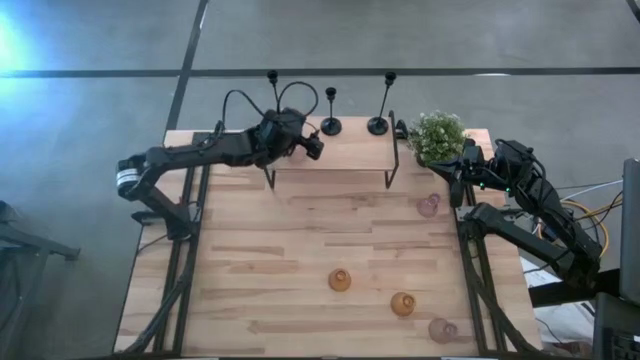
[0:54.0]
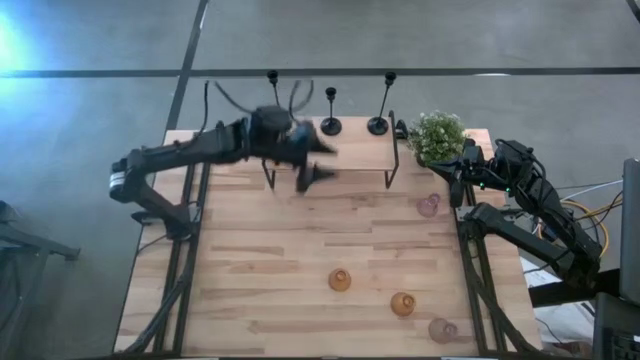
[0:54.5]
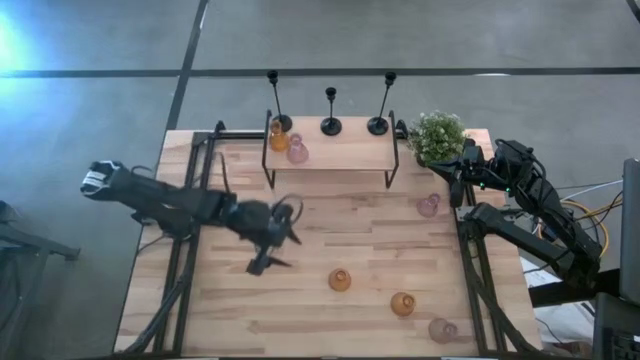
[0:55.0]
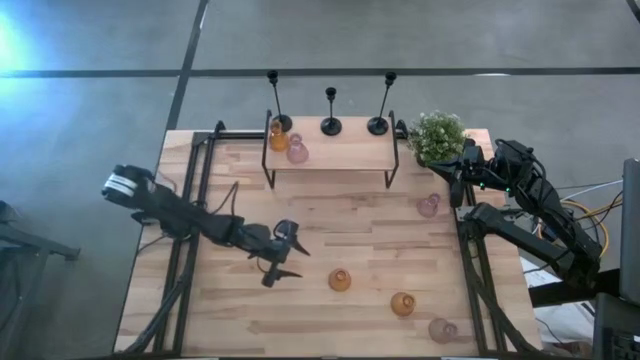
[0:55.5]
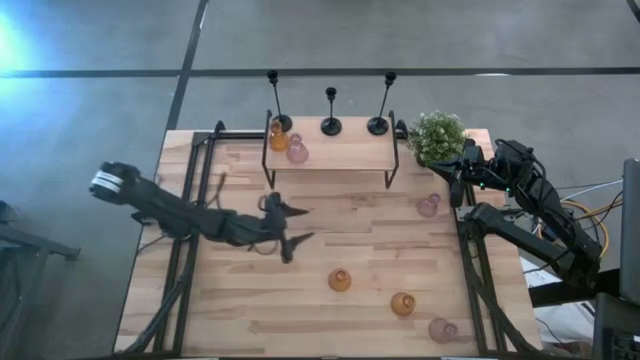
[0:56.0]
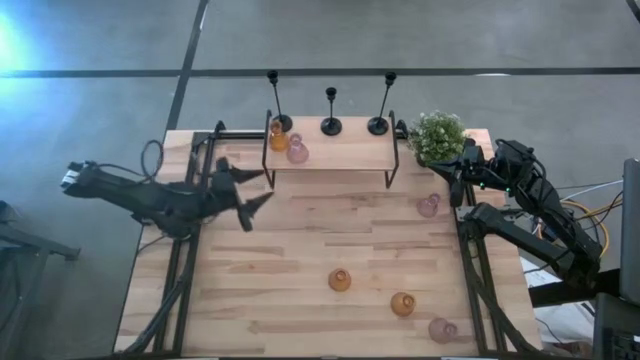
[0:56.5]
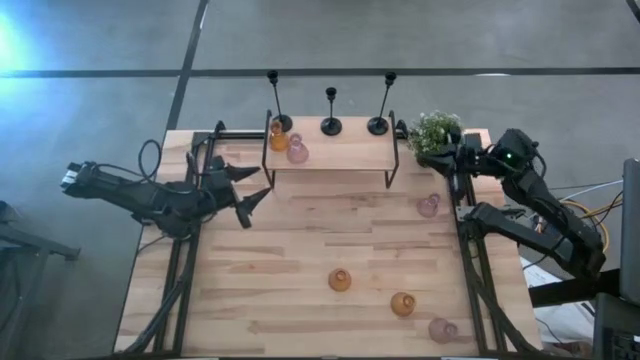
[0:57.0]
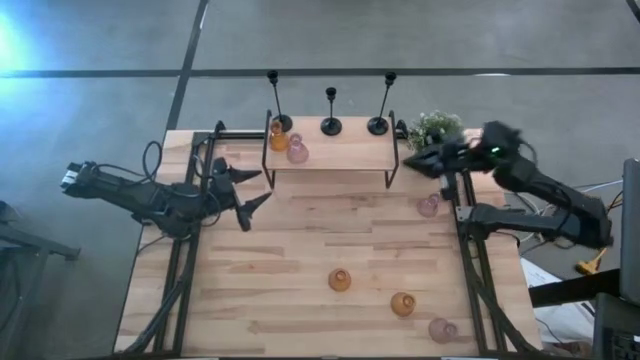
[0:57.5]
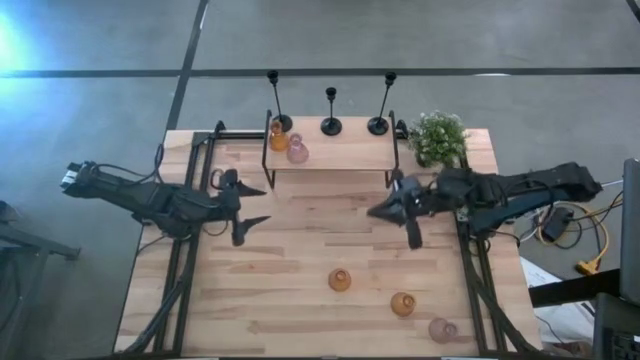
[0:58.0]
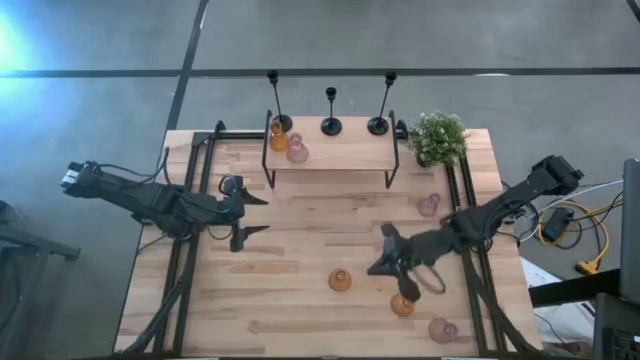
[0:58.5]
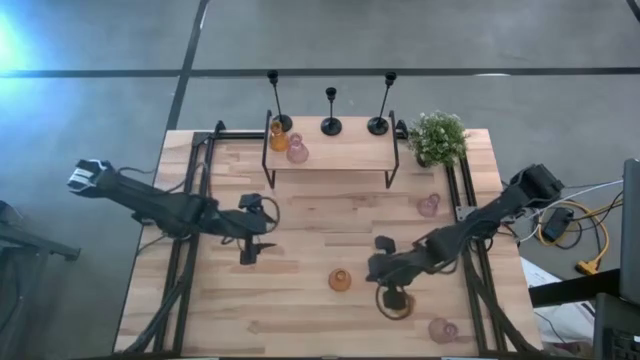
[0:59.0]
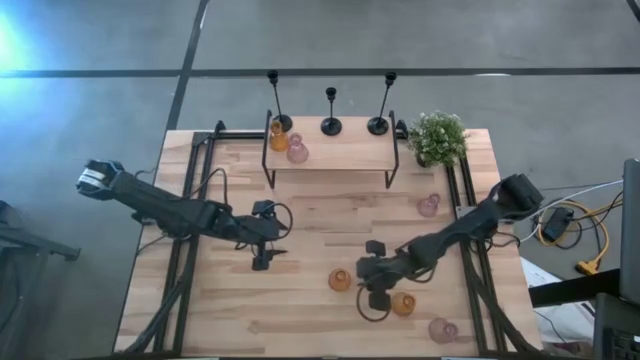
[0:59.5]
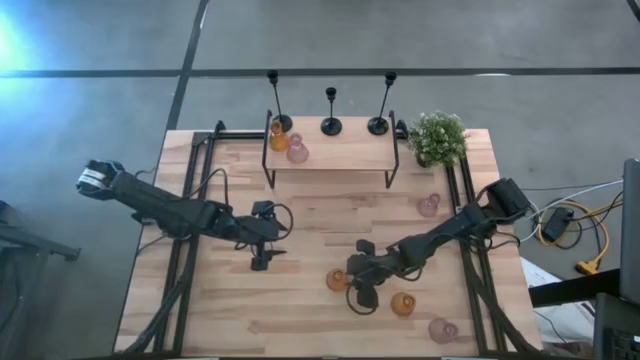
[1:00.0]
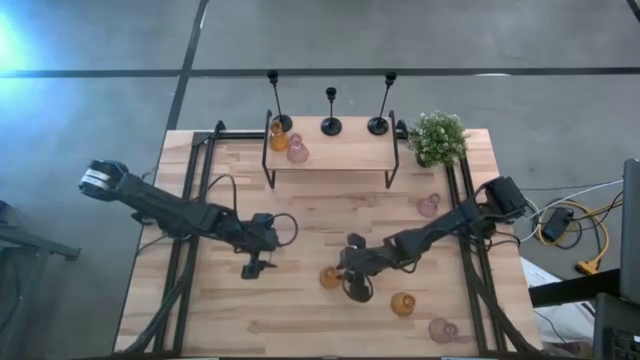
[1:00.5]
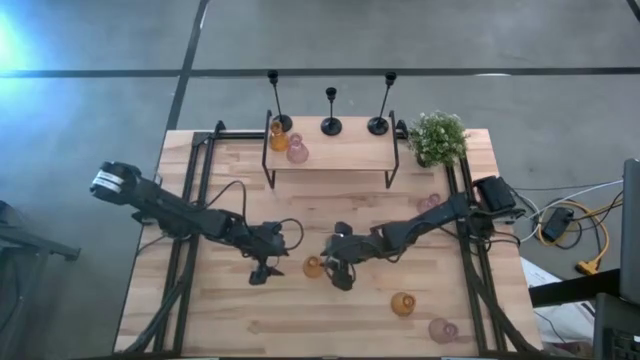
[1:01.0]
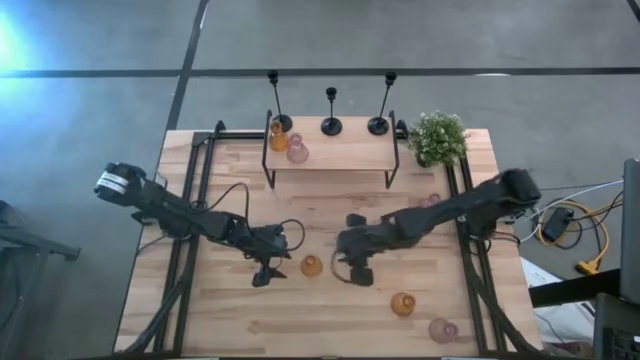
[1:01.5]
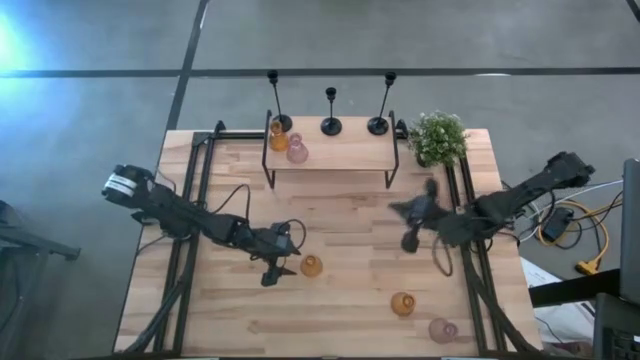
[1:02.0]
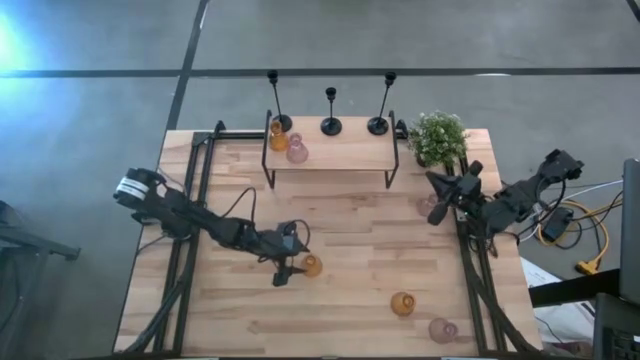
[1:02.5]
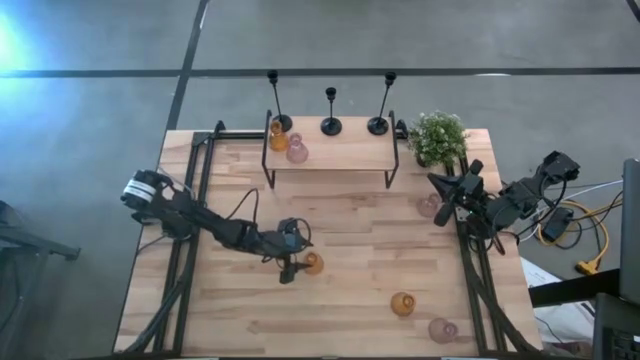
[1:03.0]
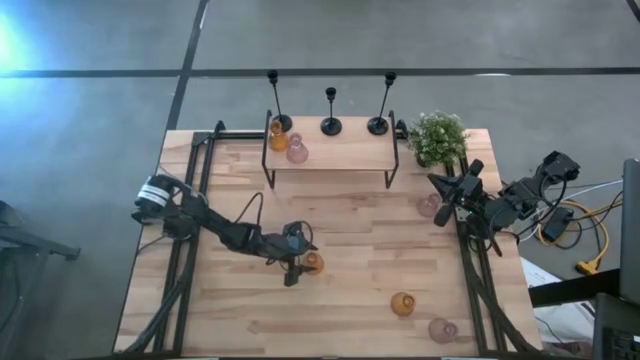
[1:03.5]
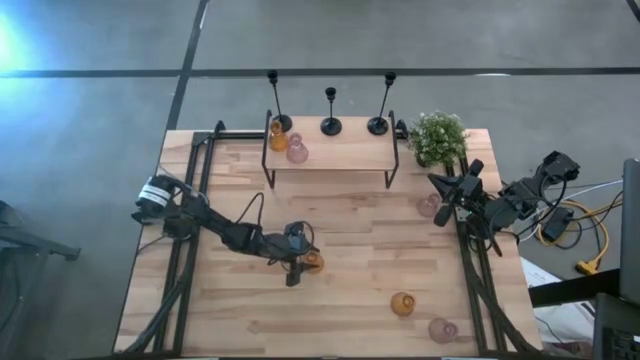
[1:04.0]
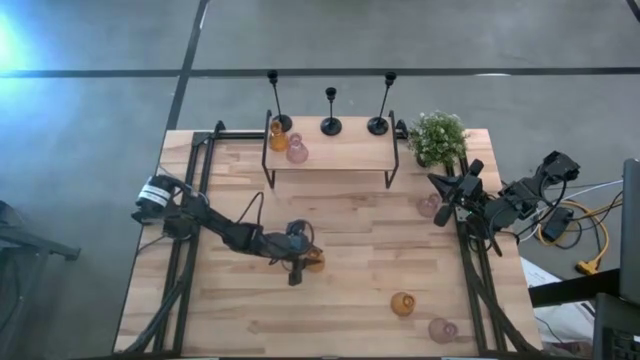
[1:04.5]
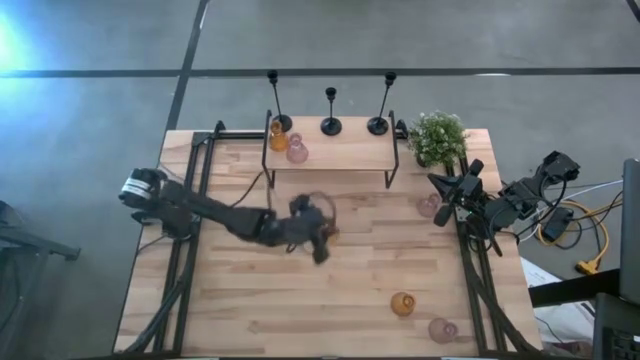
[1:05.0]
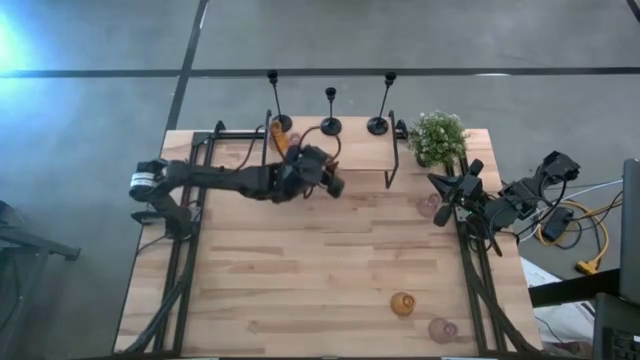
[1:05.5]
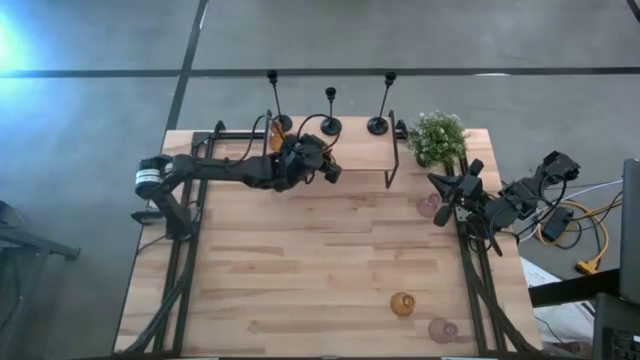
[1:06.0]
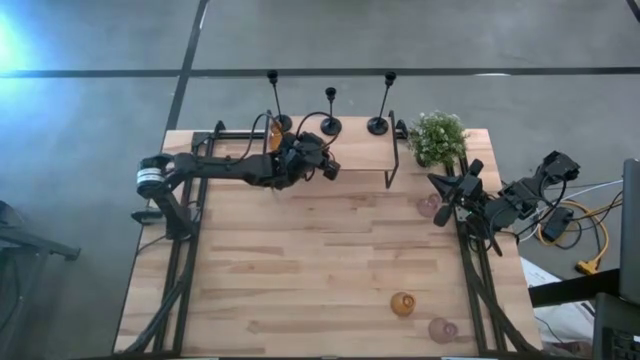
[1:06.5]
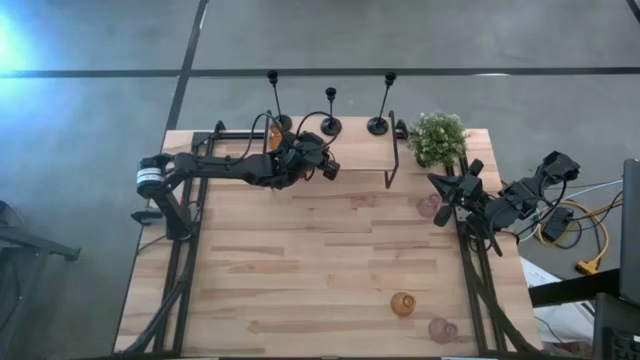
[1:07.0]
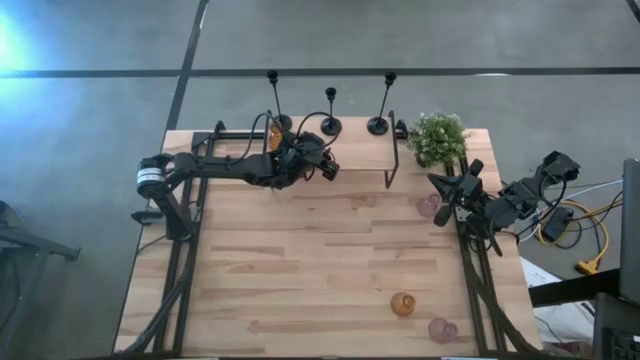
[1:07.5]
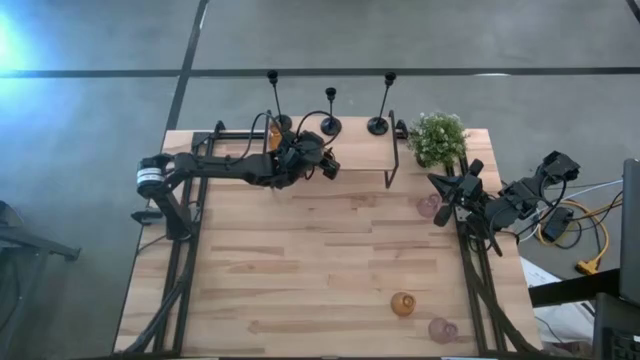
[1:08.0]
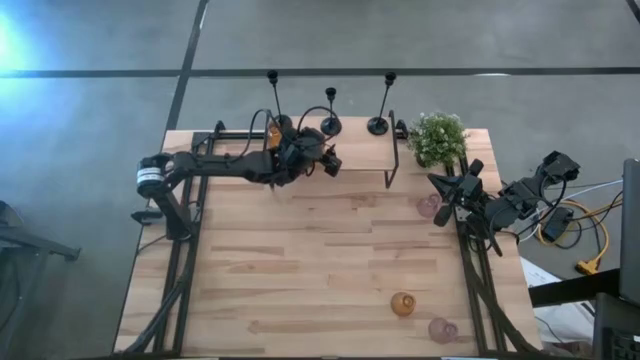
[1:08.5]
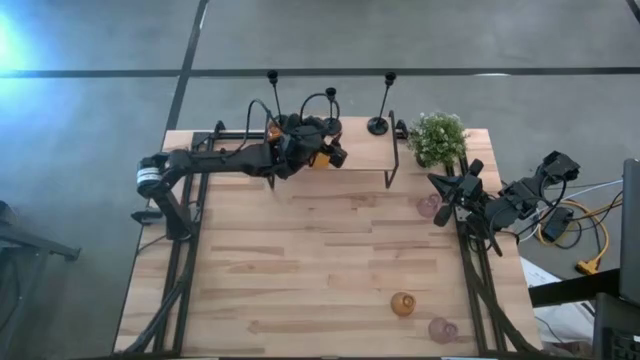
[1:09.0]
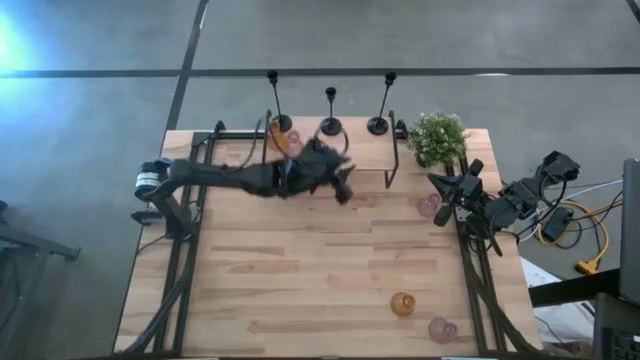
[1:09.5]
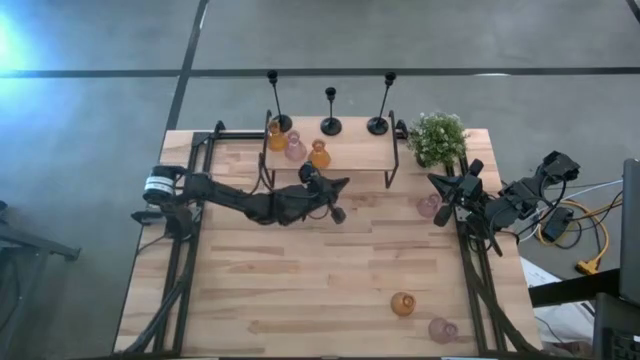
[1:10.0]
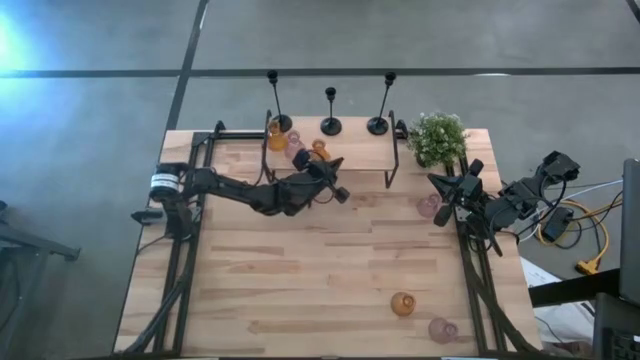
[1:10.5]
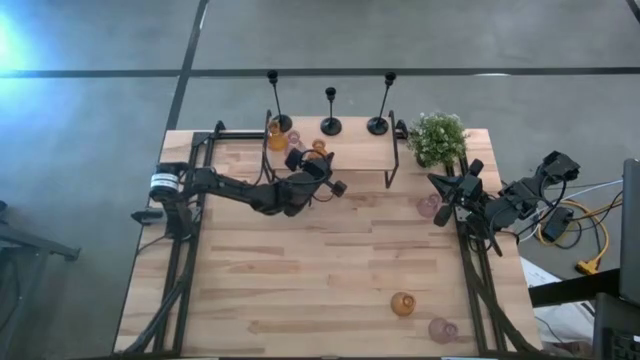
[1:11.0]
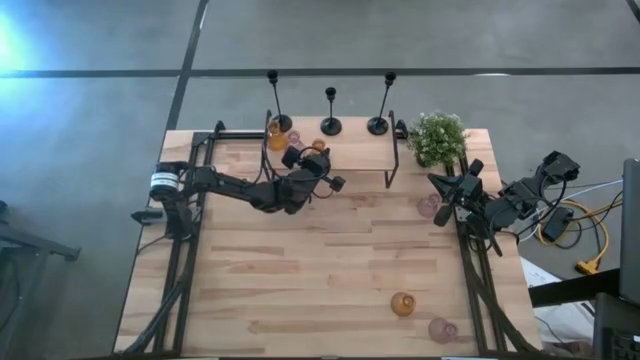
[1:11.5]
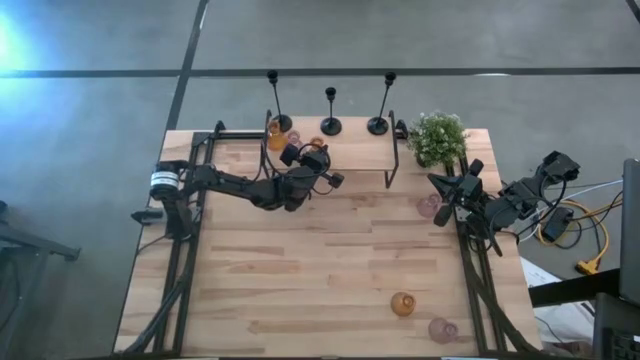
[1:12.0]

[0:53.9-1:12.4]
Task: Pick & Place candle stick holders
Put the left orange glass candle holder on the shelf

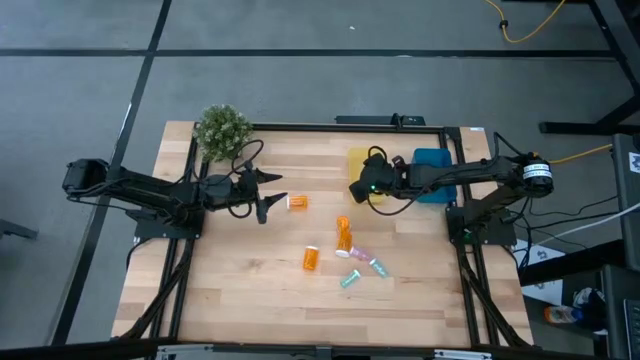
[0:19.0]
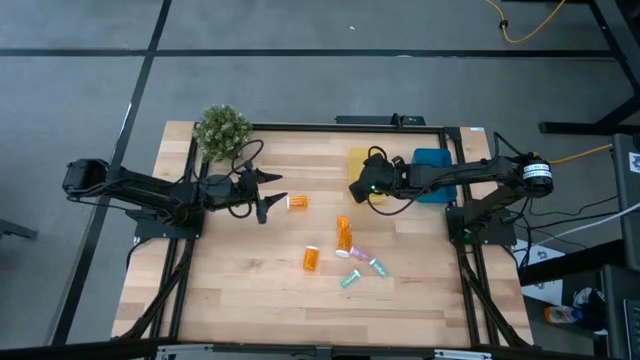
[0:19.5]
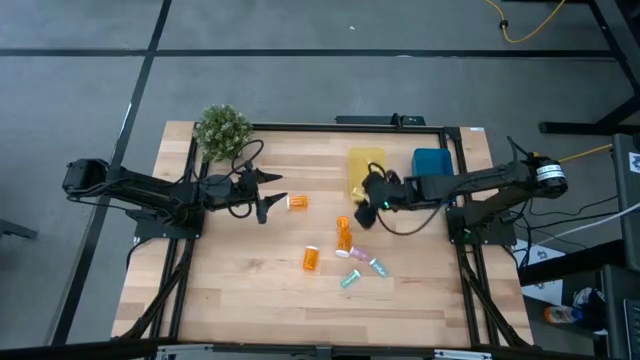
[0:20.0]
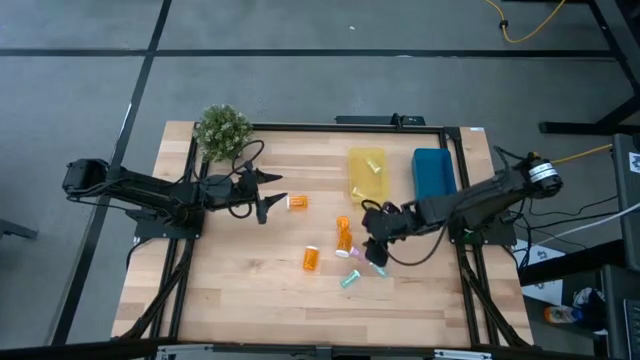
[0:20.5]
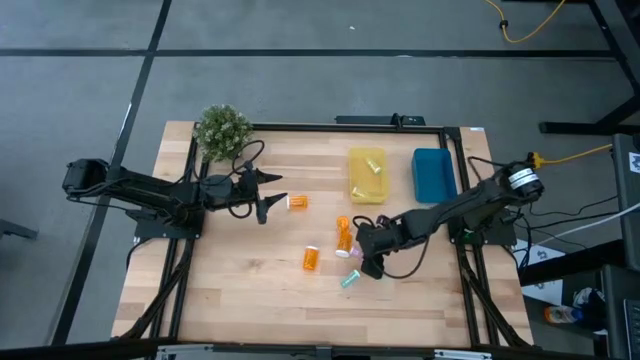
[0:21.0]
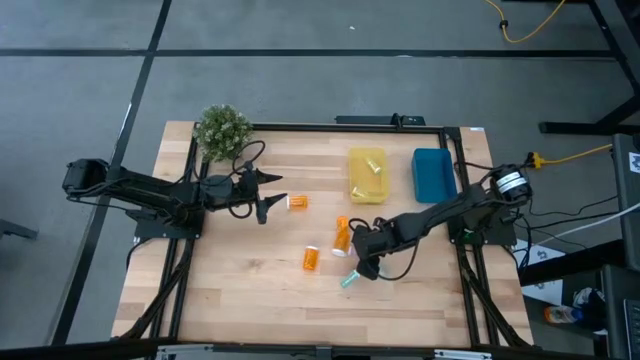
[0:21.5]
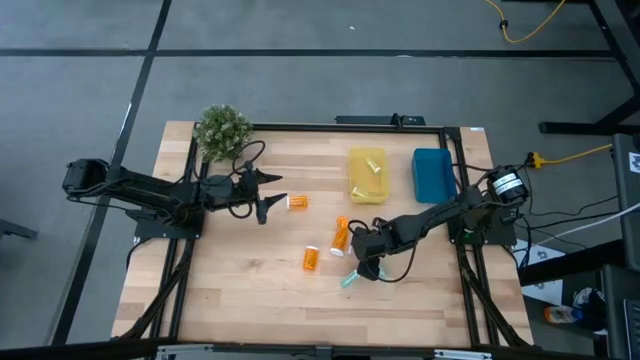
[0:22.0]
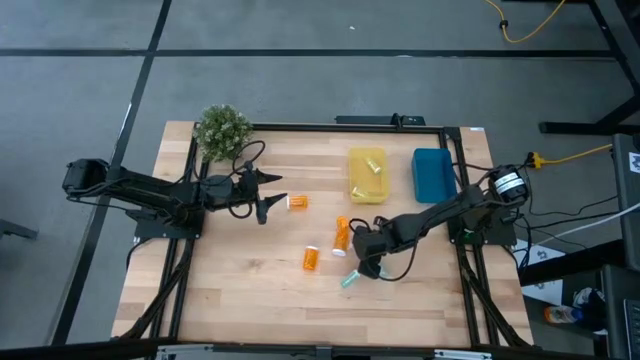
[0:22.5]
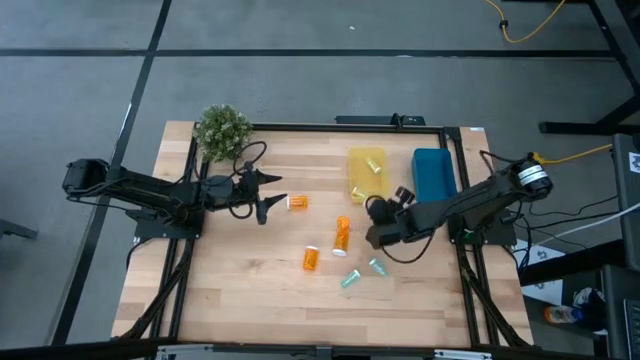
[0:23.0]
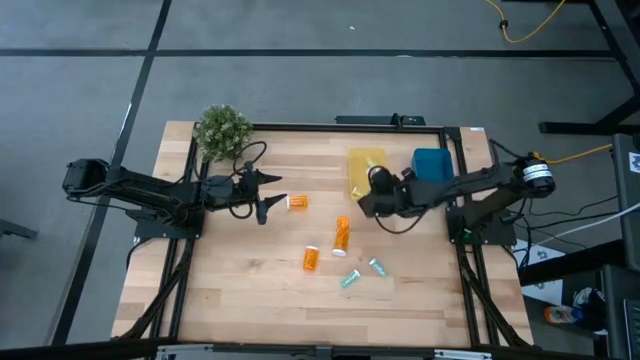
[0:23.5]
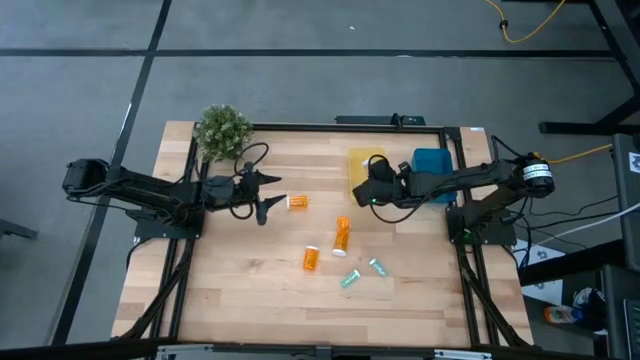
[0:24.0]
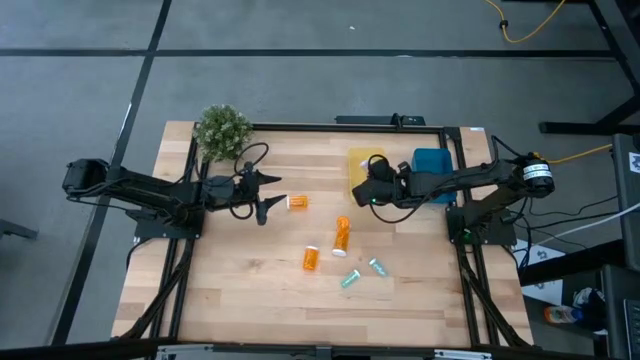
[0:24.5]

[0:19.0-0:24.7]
Task: Pick and place medicine bottles into bin by pill shape (circle, oval)
Put the small pink pill bottle into the yellow bin
